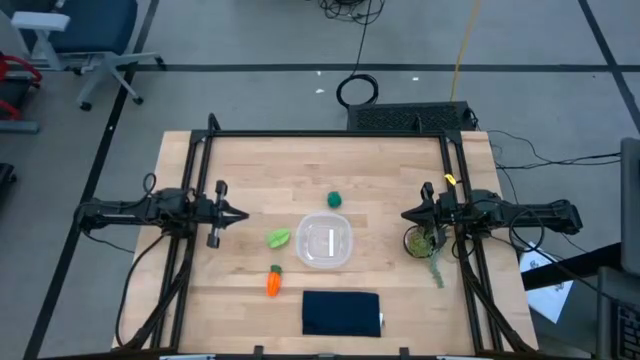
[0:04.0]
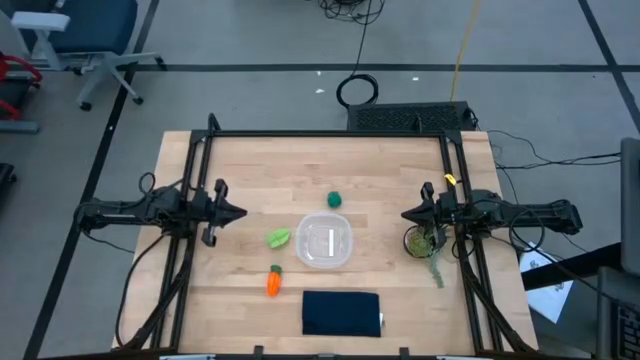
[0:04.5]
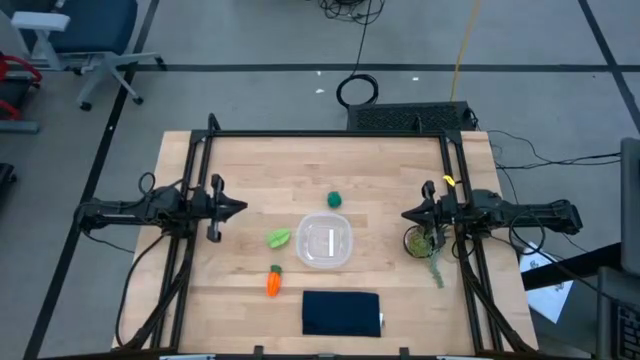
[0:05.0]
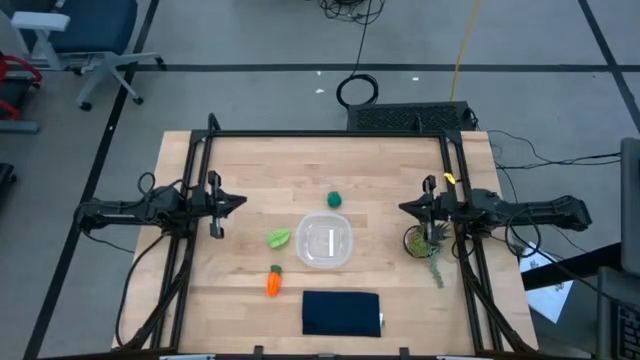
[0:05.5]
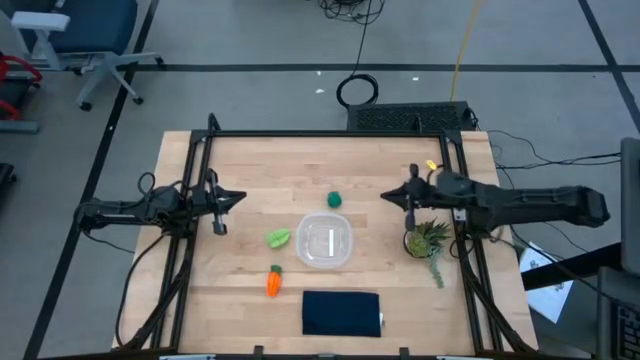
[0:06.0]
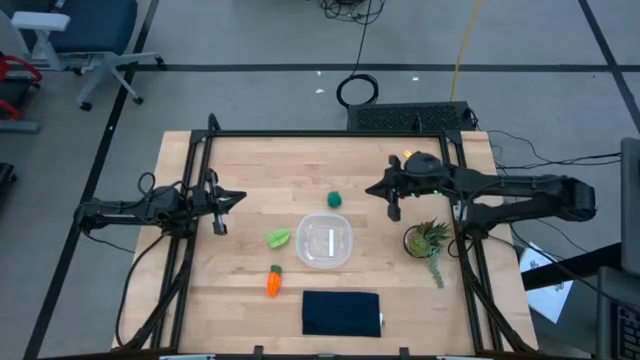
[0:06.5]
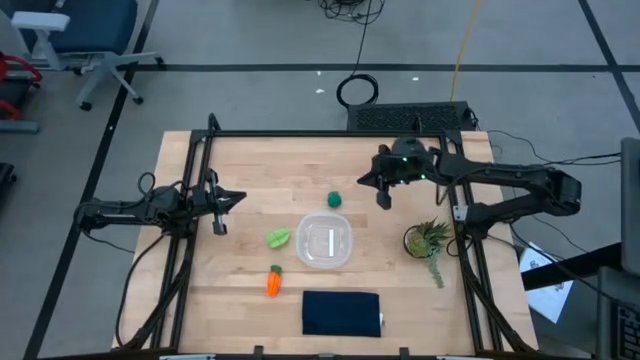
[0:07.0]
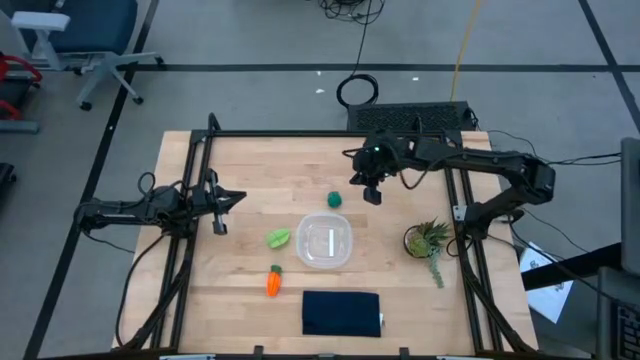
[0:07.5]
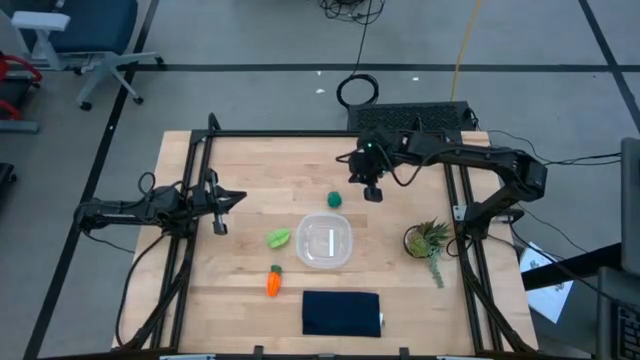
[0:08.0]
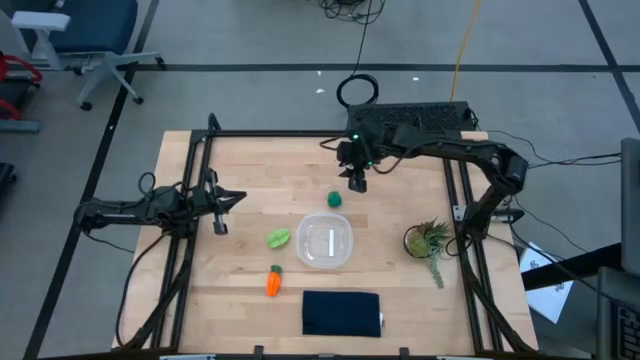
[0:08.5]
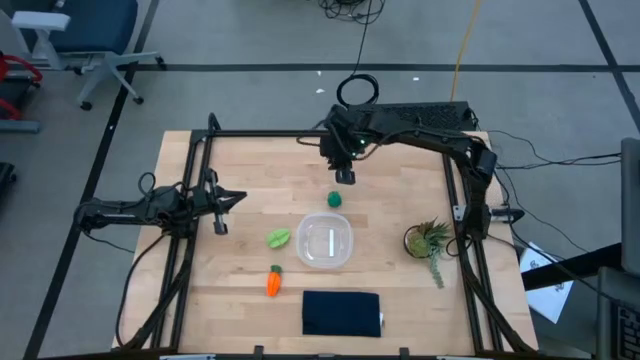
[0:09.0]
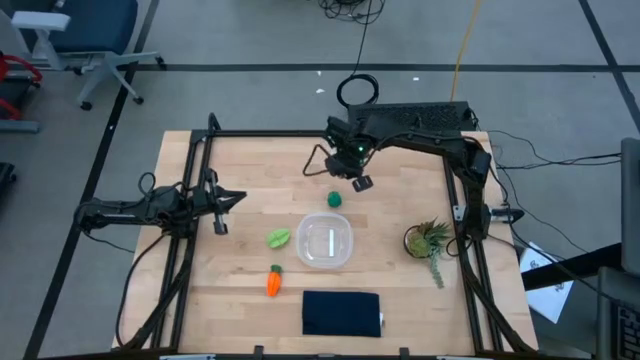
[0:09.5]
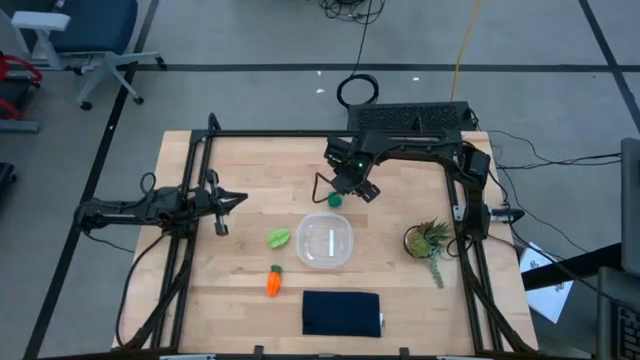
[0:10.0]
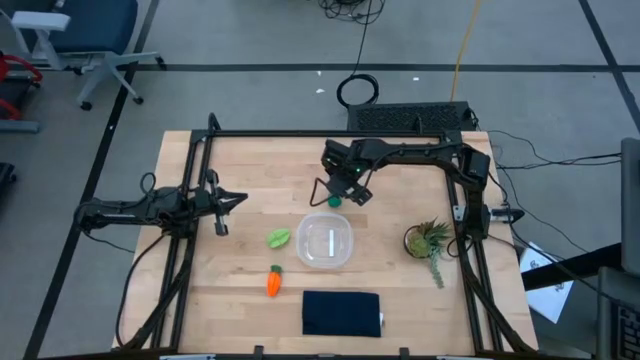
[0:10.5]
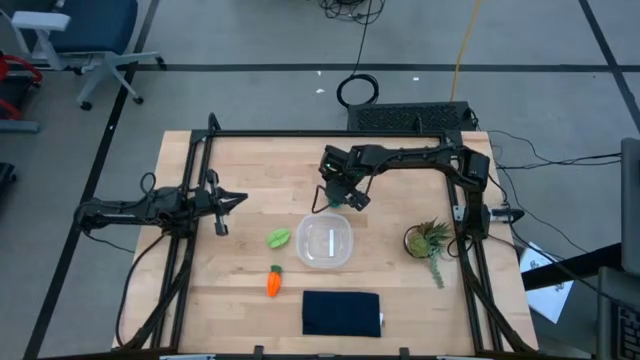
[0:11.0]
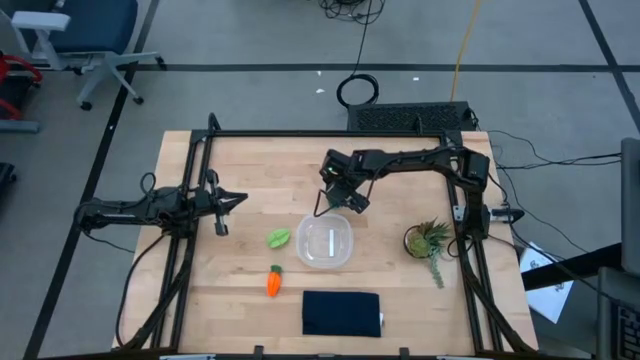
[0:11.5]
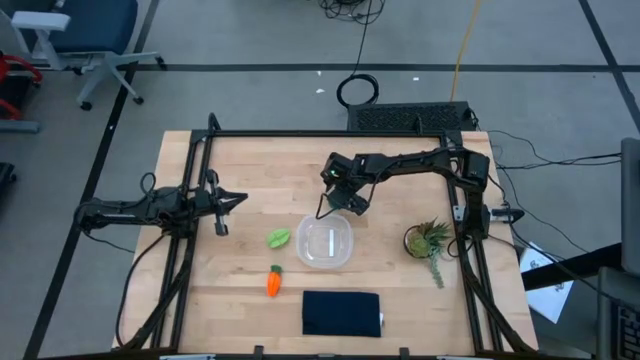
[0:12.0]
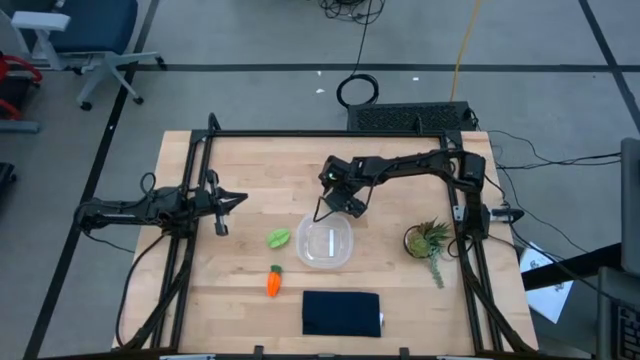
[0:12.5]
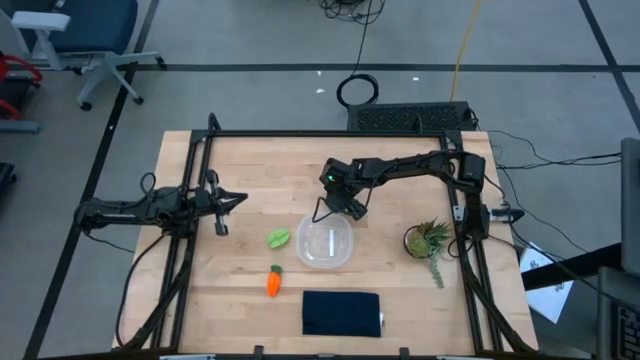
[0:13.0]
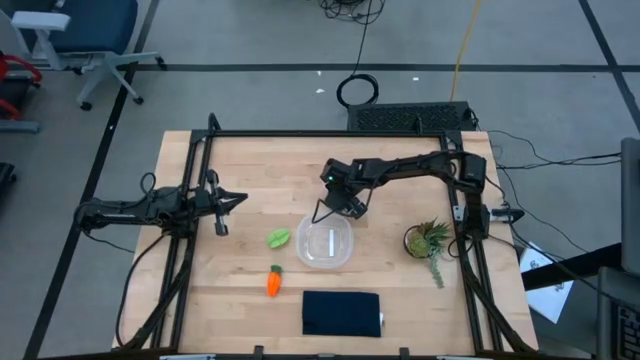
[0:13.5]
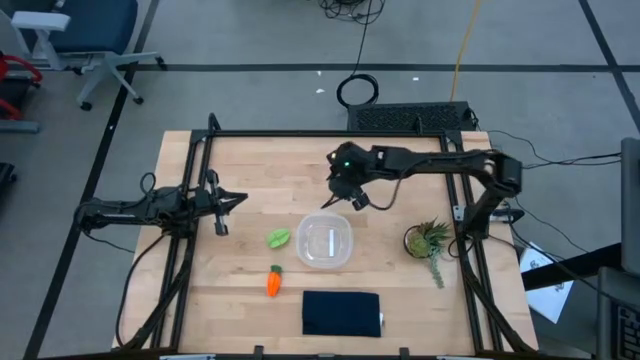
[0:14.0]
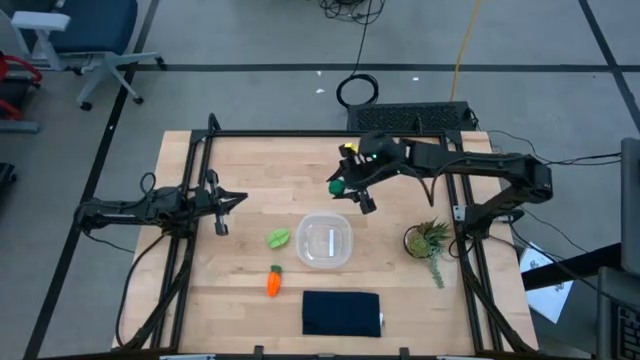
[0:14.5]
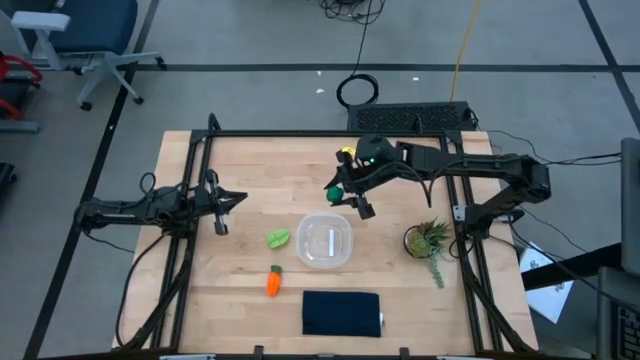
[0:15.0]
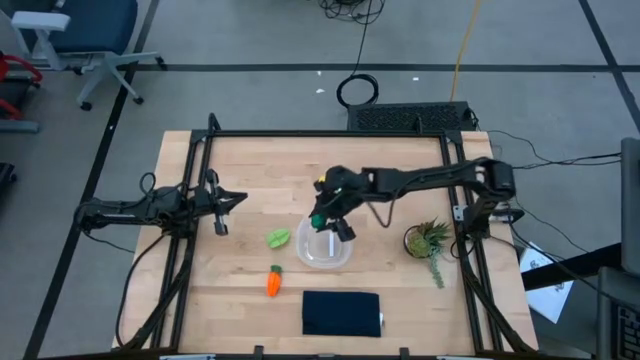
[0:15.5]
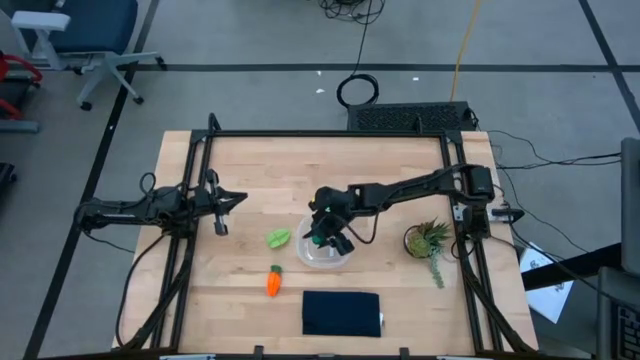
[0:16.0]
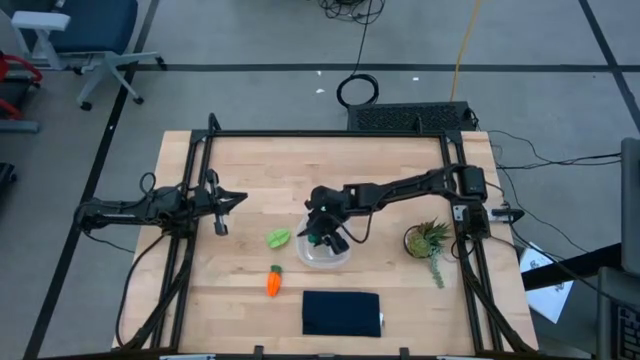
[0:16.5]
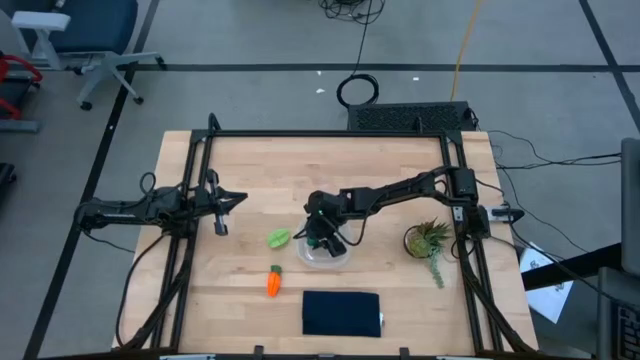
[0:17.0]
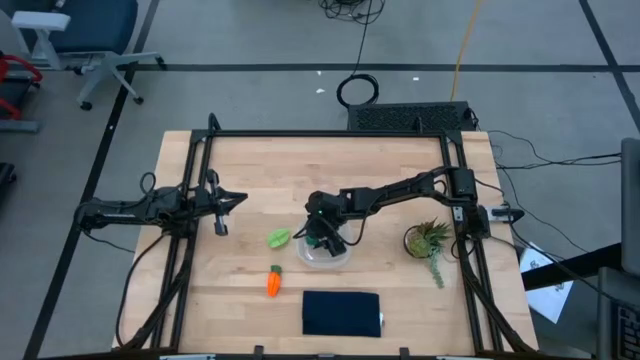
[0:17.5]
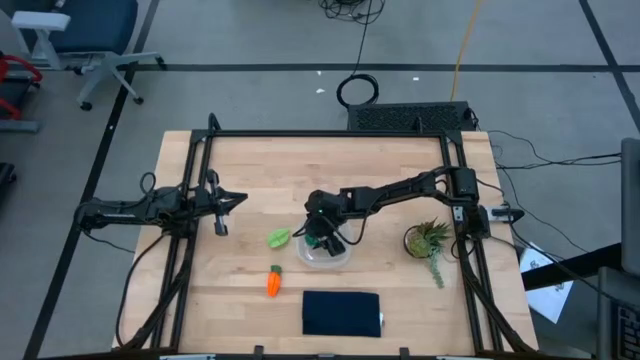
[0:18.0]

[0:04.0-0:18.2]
Task: Pick and placing Produce into tupperware
Put the green bell pepper into the bin

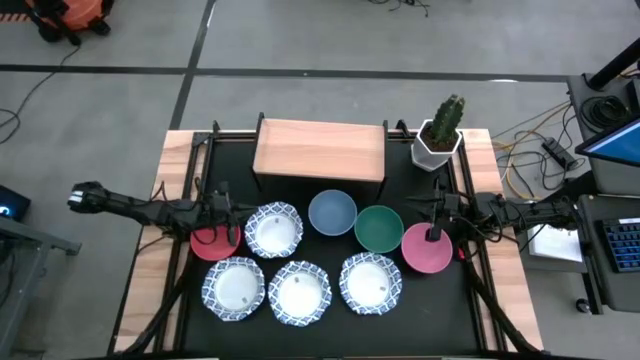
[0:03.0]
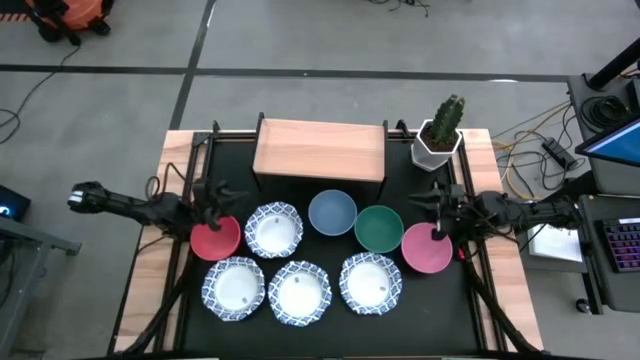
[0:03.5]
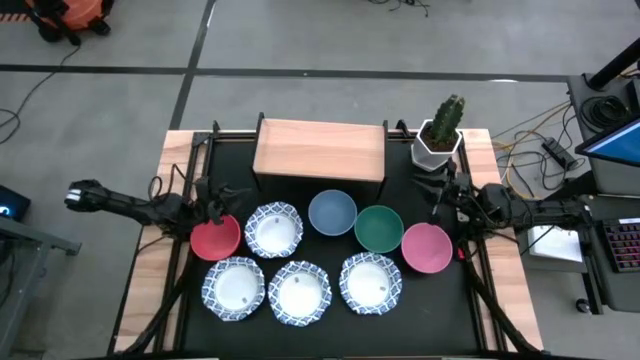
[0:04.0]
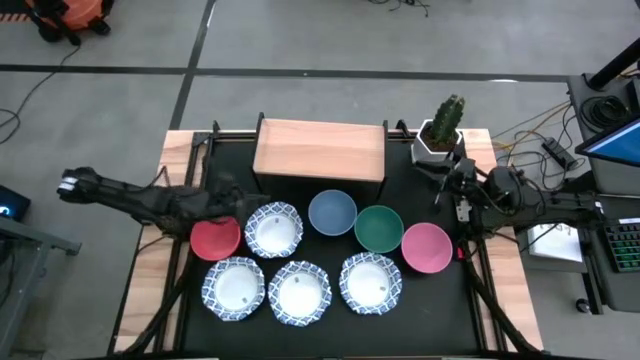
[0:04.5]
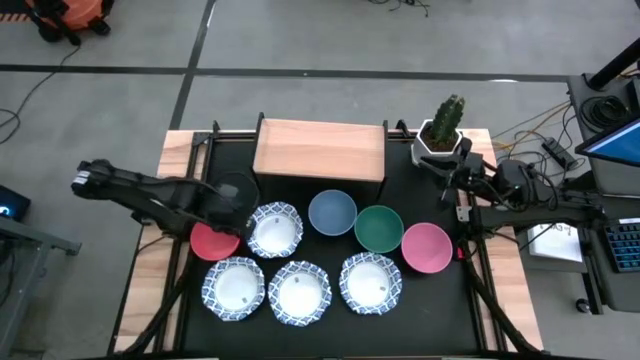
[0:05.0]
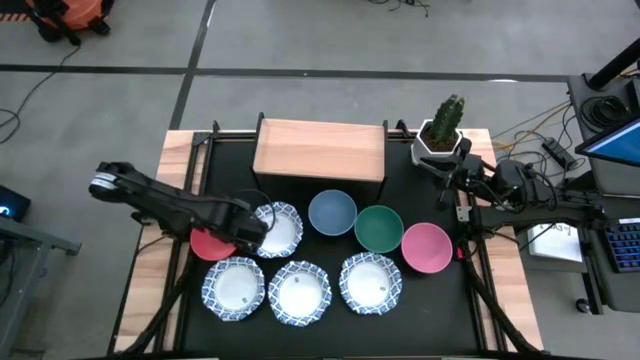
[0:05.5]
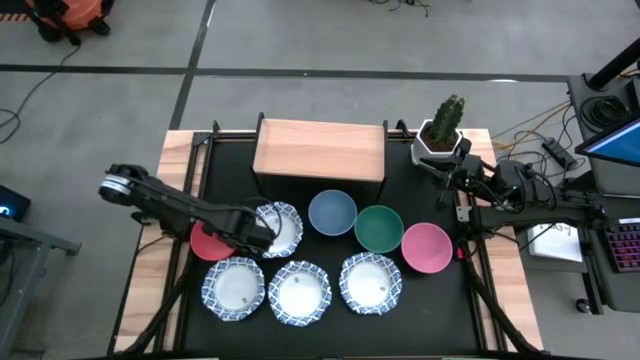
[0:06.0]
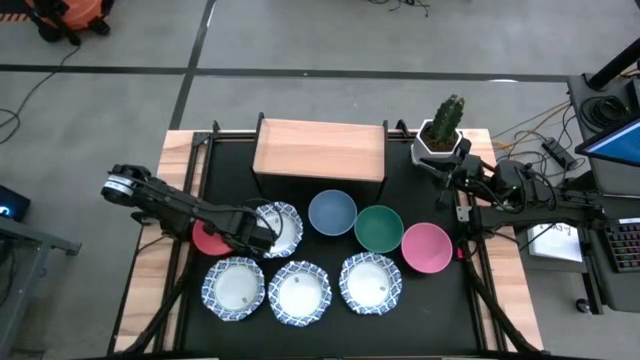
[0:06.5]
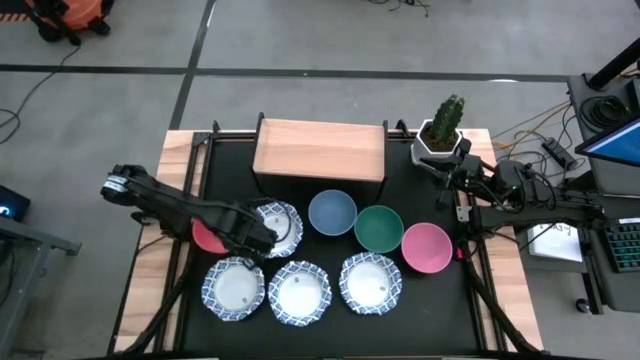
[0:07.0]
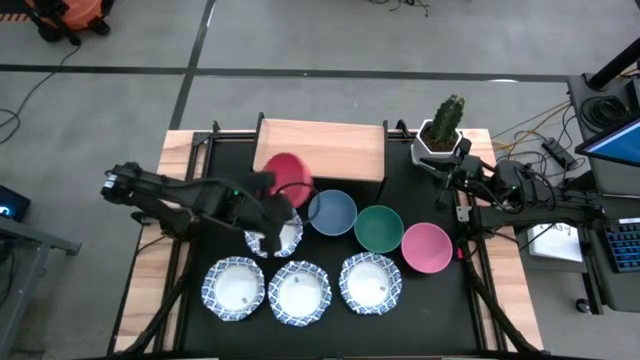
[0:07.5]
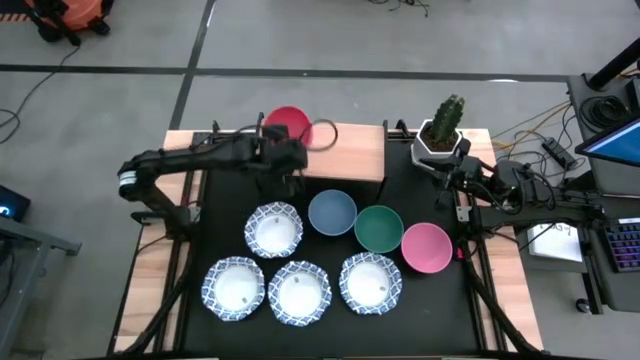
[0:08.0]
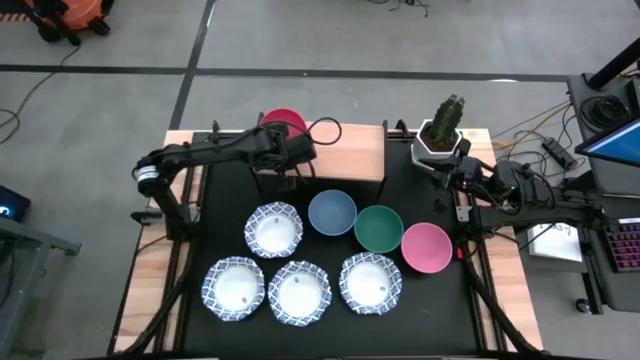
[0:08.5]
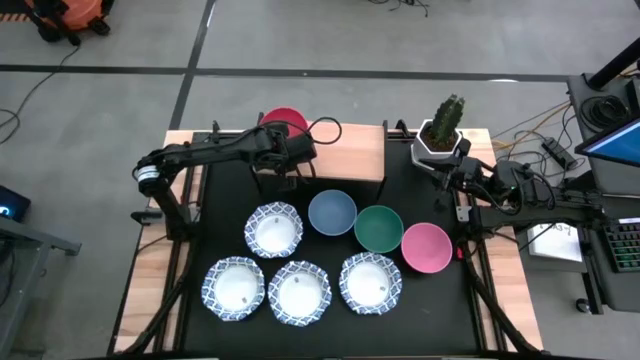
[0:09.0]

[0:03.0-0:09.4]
Task: Place and stack bowls onto a shelf
Put the orange bowl on the shelf
